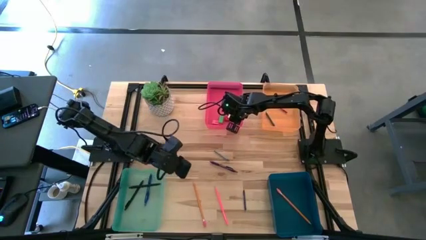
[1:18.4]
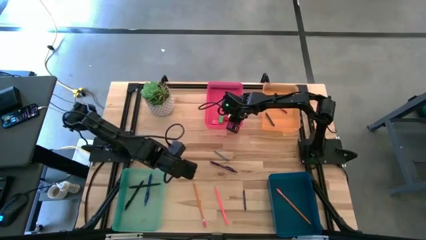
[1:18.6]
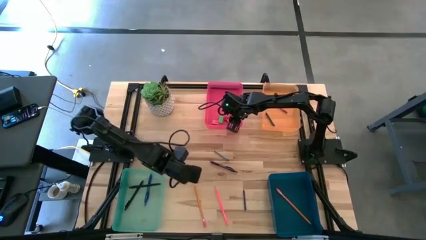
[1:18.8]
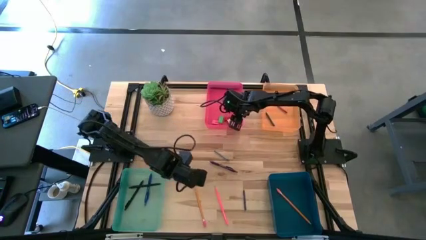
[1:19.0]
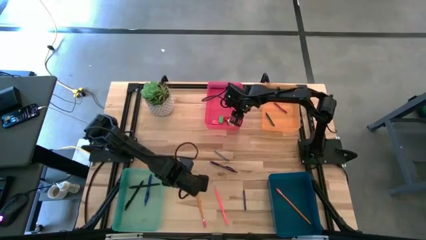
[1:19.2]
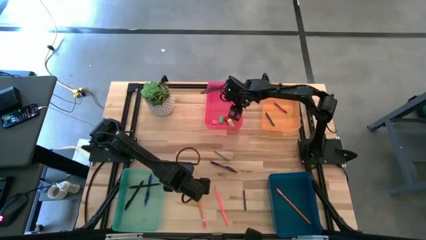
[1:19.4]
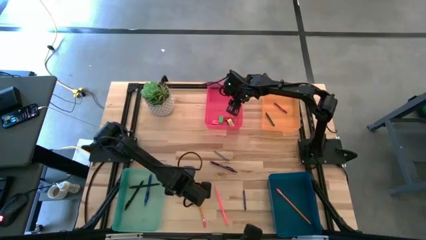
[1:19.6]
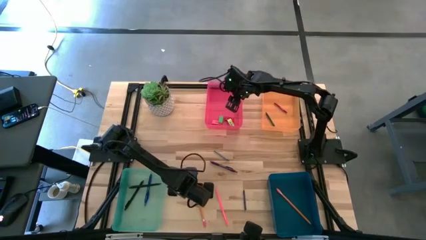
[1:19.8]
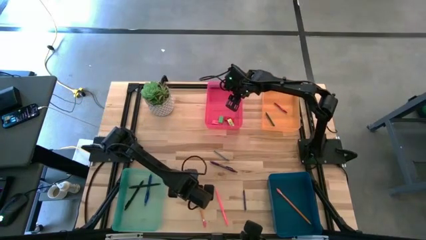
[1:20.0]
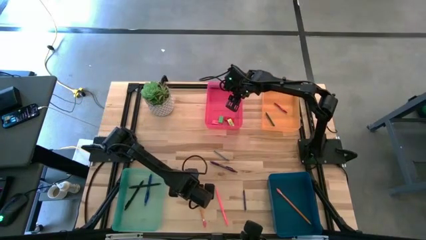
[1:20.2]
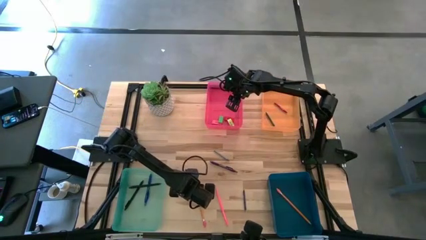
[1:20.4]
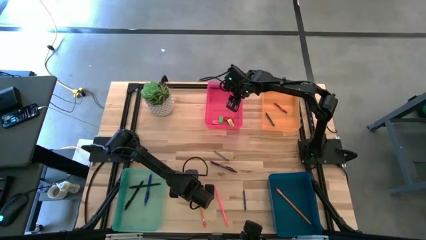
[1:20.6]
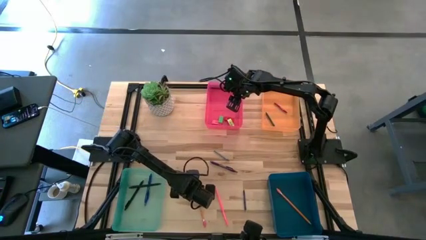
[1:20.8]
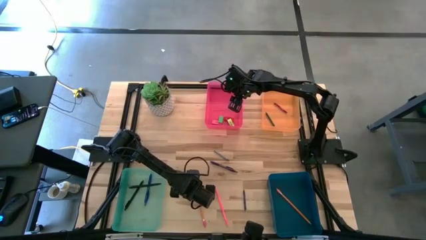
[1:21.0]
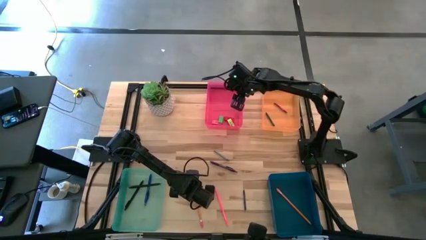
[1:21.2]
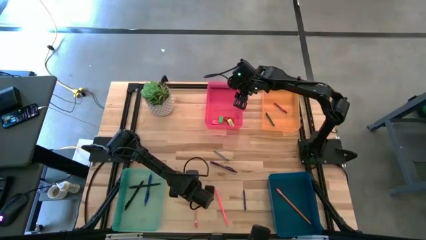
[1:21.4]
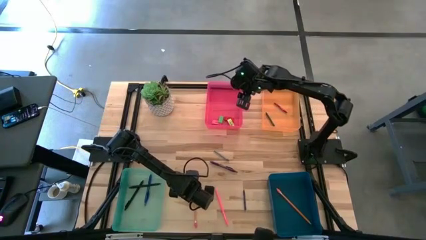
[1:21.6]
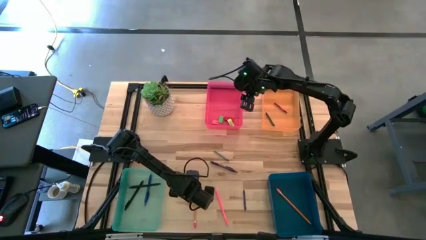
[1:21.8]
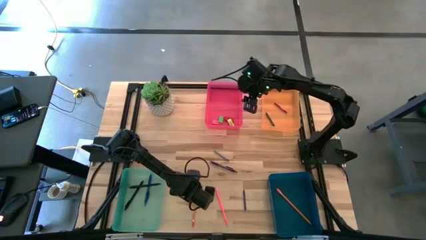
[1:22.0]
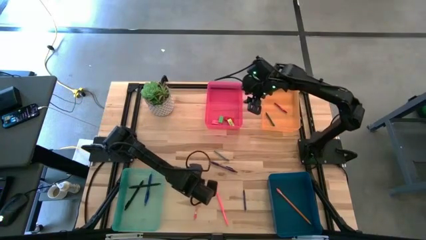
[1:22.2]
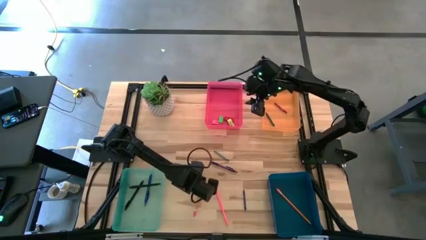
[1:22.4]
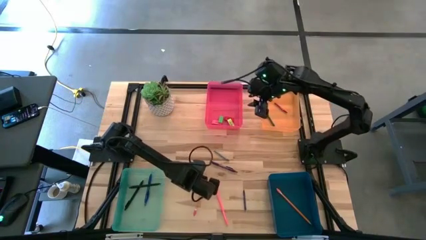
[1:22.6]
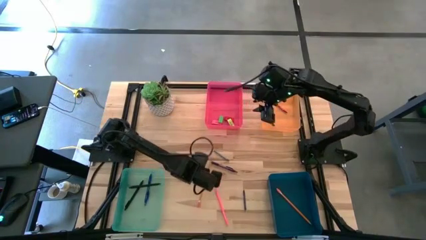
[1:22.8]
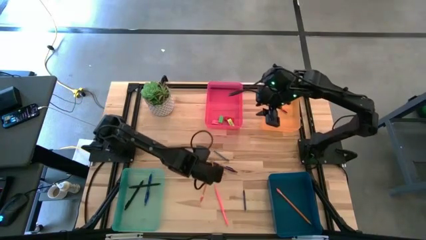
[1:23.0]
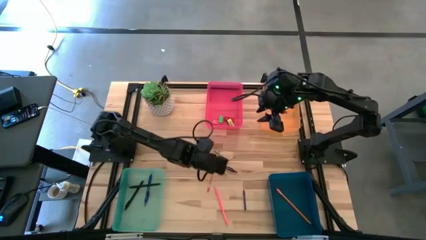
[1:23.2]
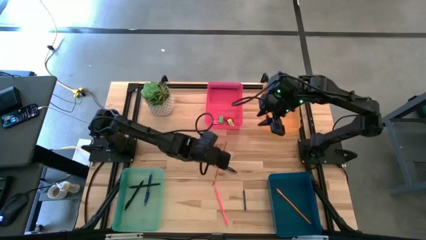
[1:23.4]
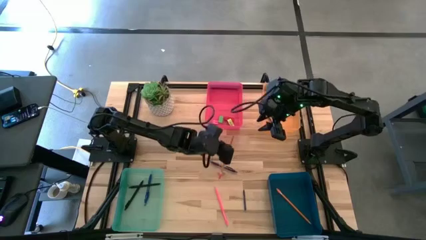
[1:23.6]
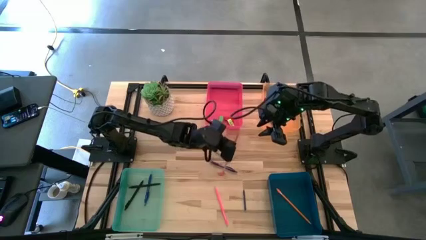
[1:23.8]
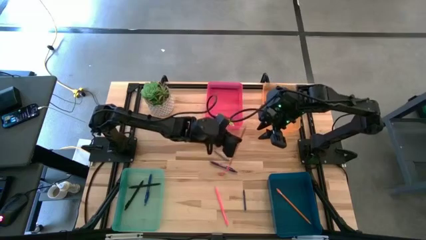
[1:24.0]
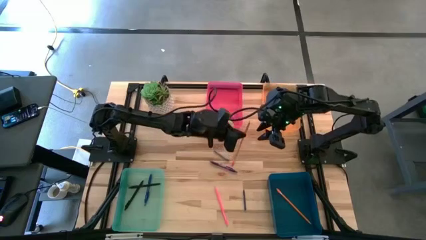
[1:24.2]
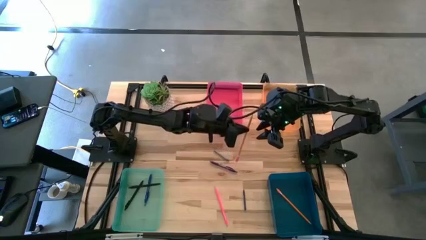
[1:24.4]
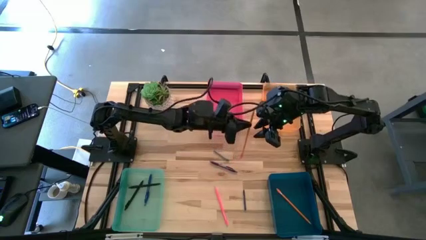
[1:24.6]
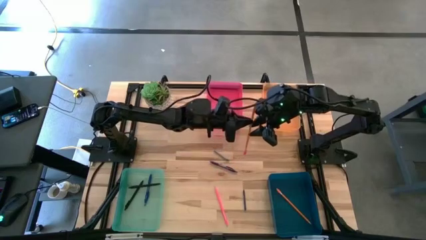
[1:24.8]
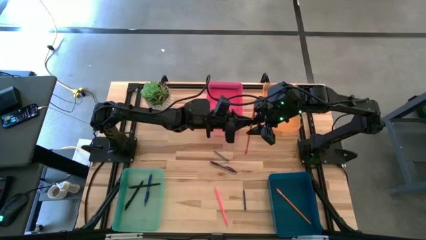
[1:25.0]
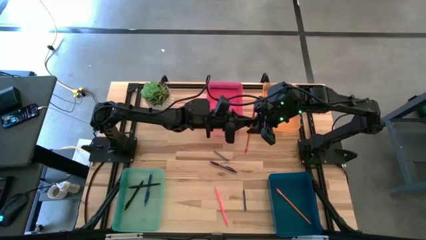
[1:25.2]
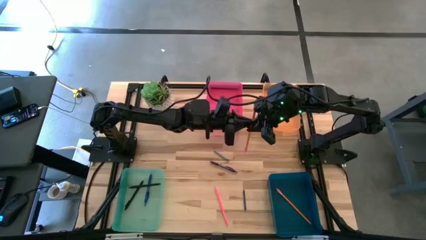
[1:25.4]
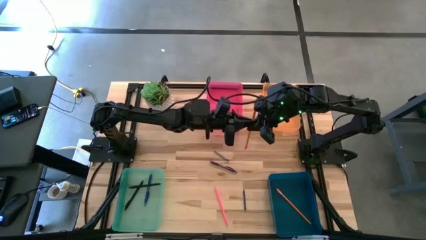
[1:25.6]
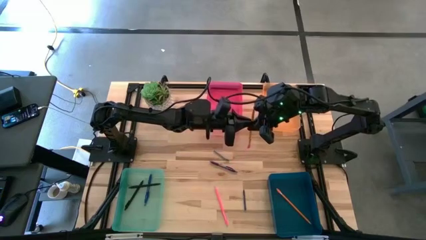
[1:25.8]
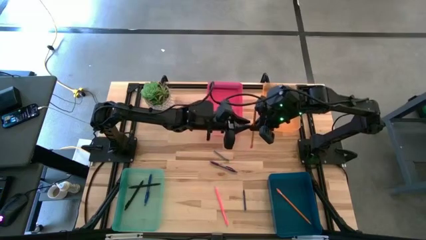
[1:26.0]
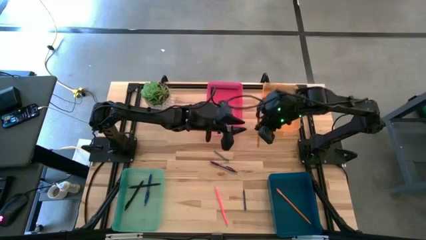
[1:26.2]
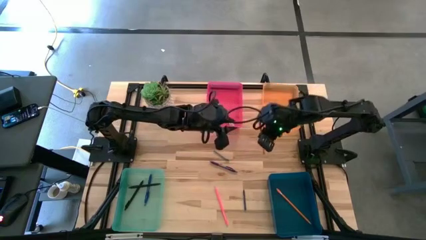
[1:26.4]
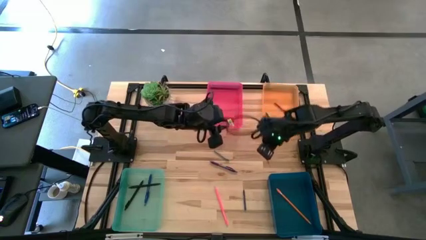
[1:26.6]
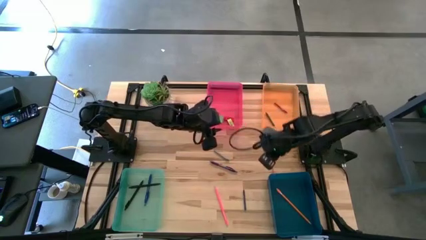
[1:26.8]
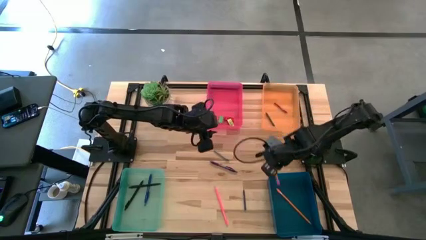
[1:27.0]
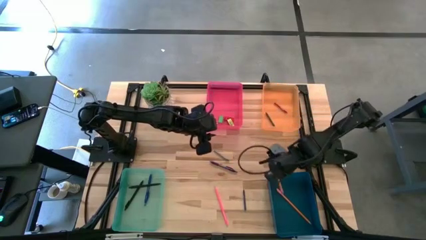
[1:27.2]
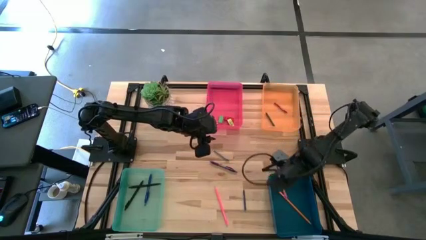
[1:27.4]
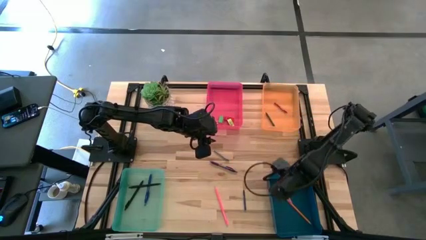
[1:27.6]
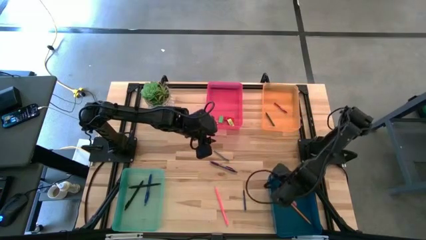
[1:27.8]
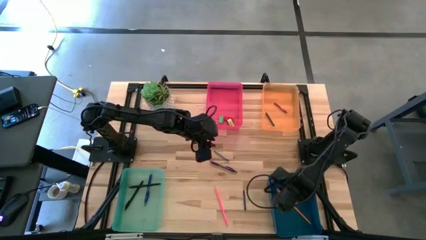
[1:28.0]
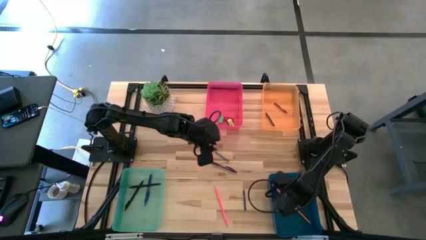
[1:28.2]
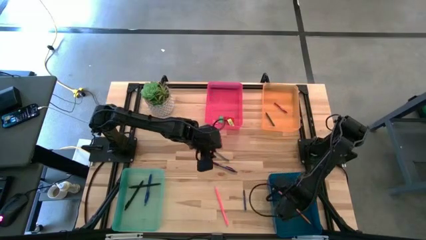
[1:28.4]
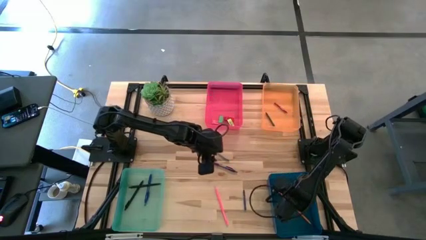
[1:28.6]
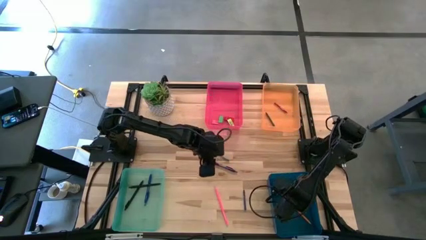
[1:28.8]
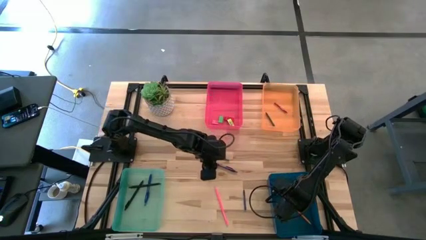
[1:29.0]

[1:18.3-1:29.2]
Task: Sort crayons/erasers/pens/pencils in bins
Put the yellow pencil into the blue bin

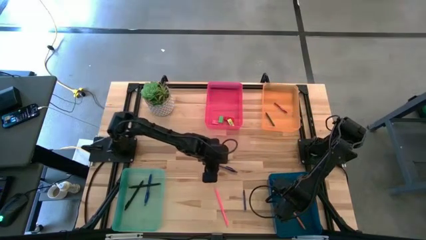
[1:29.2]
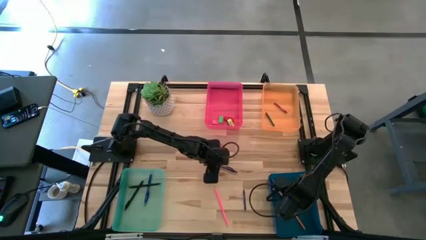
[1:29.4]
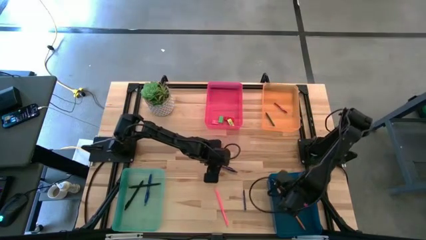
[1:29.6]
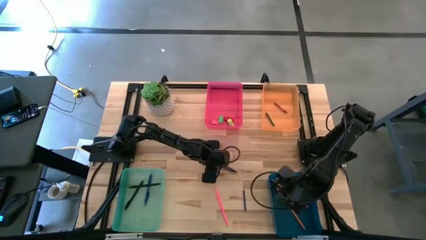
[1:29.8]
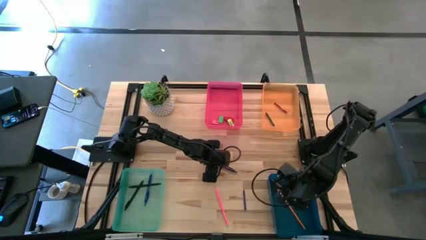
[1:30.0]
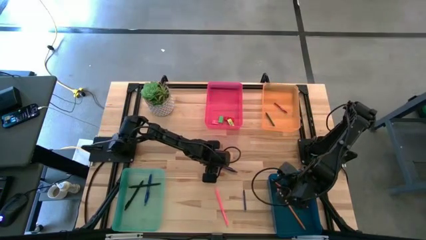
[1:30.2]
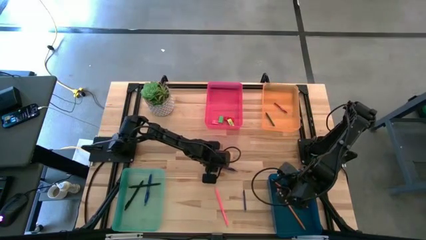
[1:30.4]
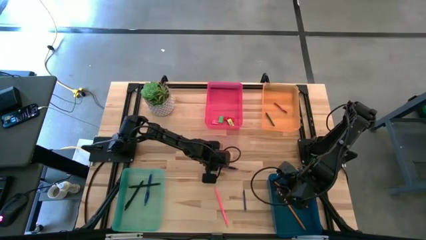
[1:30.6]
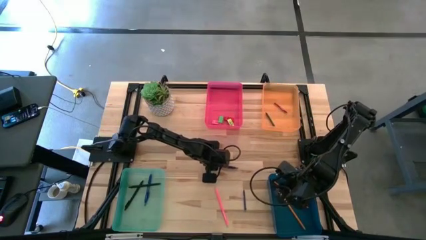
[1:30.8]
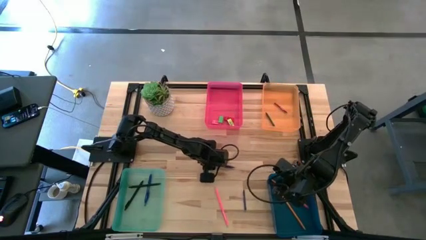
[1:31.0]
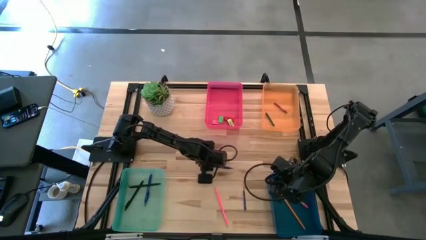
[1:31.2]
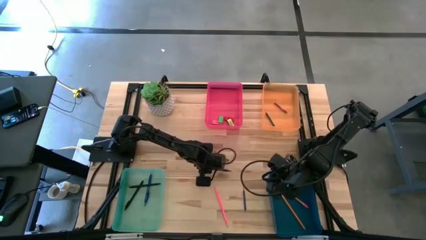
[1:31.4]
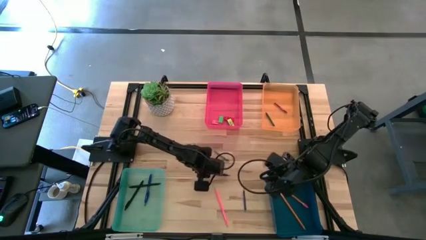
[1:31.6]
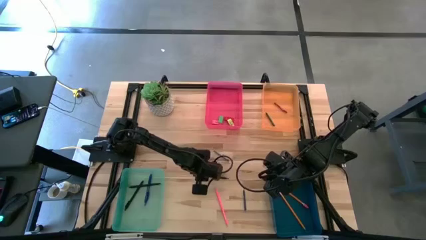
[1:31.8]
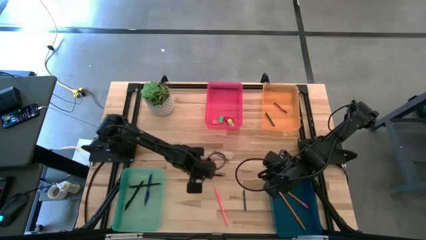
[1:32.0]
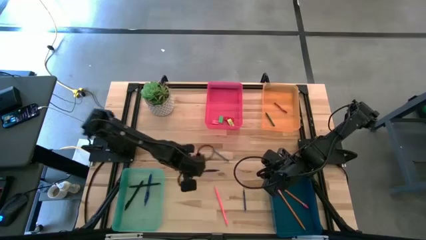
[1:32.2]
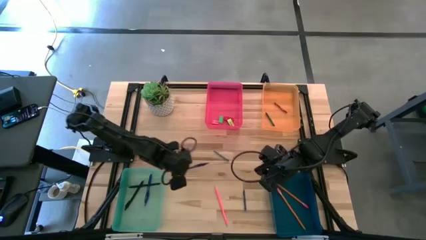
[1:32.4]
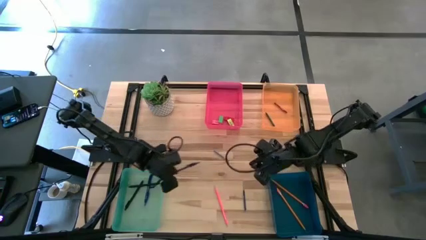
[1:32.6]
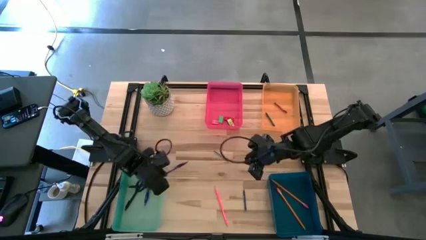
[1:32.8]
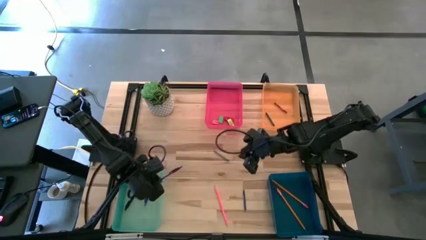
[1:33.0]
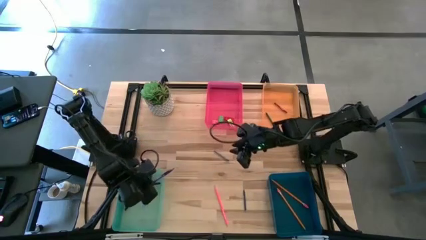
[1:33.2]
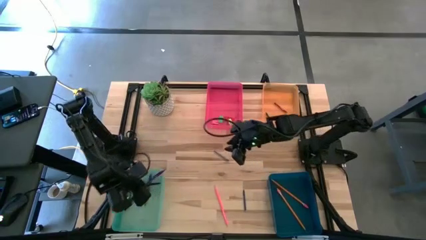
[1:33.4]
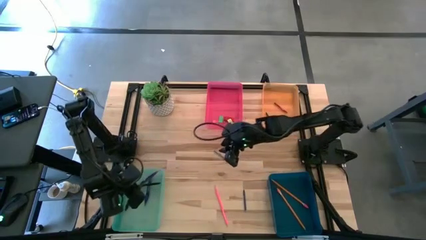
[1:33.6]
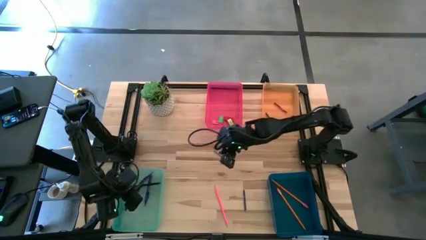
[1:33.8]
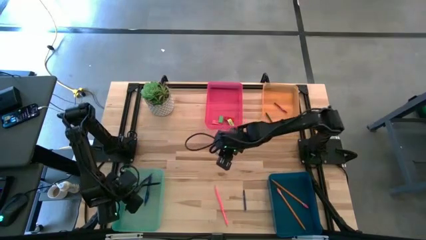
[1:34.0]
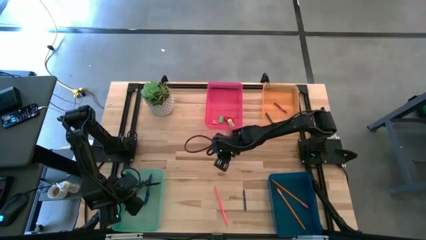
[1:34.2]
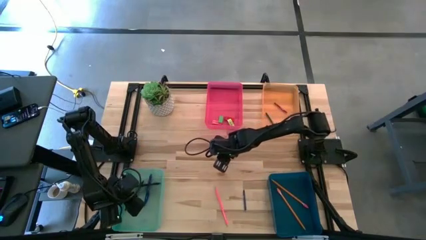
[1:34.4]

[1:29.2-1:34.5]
Put the violet ballpen into the green bin

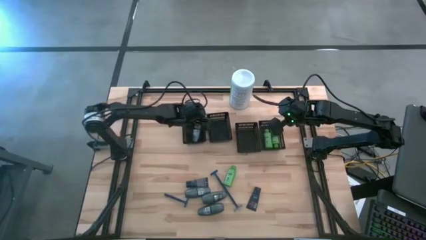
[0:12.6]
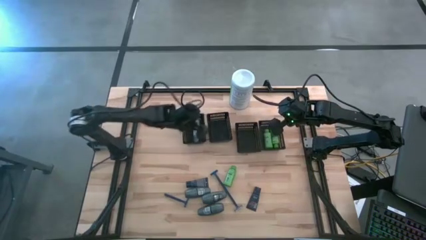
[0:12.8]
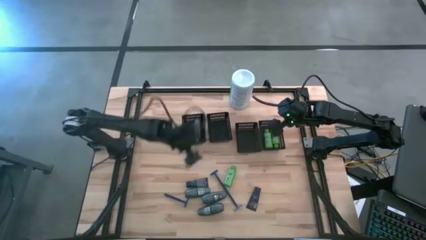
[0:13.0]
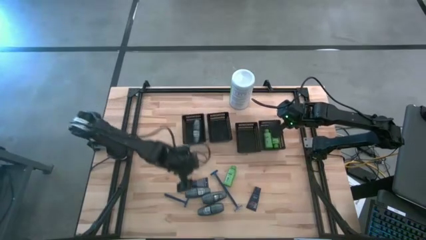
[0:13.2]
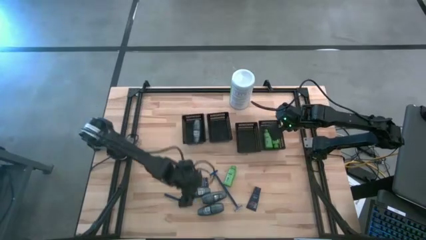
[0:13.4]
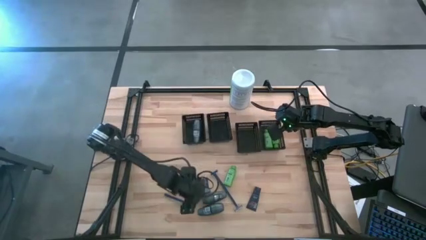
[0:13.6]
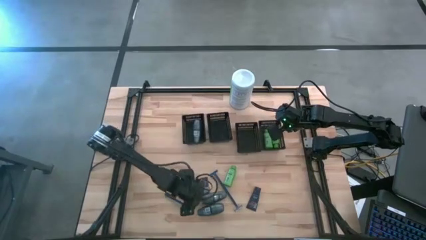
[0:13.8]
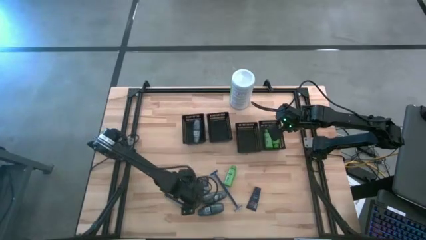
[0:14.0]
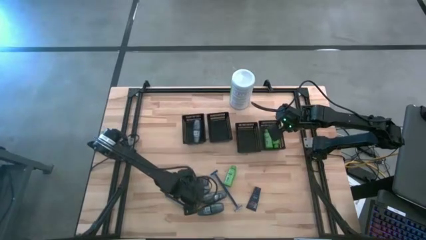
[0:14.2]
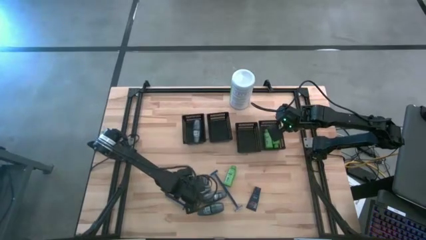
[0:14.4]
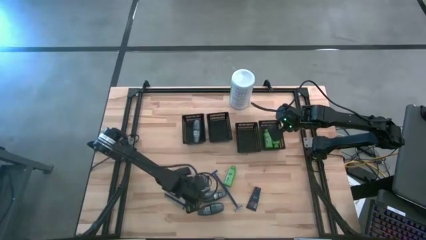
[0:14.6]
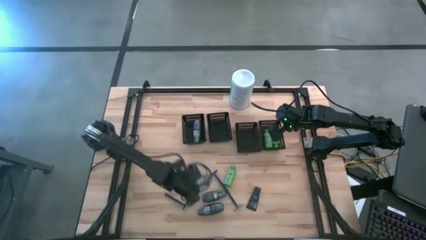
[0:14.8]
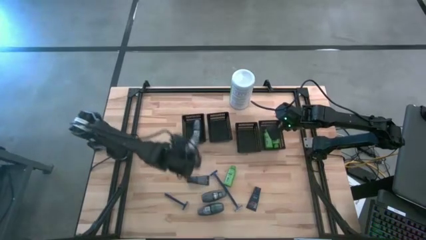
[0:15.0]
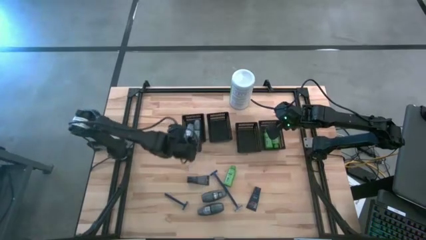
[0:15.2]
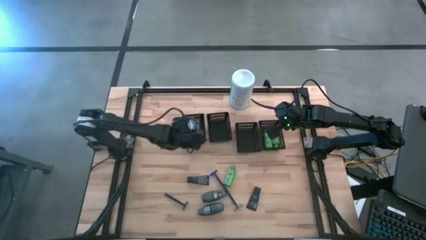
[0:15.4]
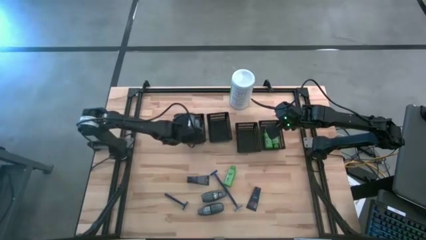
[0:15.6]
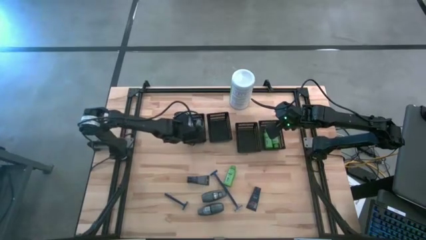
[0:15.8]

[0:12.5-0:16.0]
Task: Pick & Place Travel size toiletries
Put the black deodorant into the left black bin
